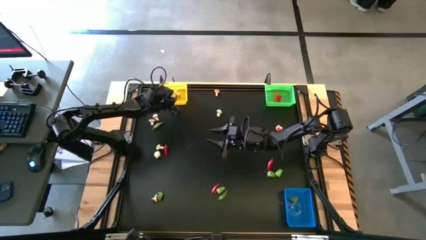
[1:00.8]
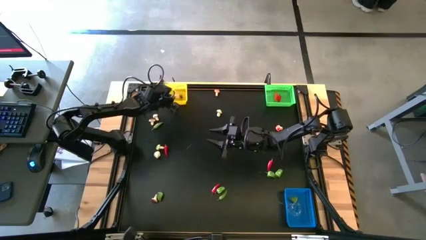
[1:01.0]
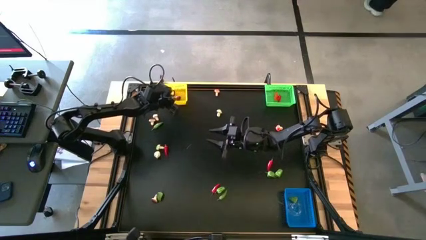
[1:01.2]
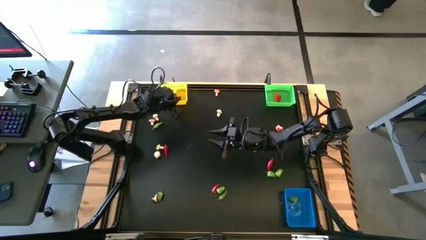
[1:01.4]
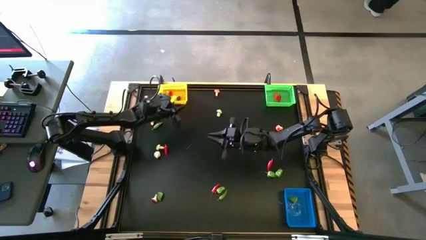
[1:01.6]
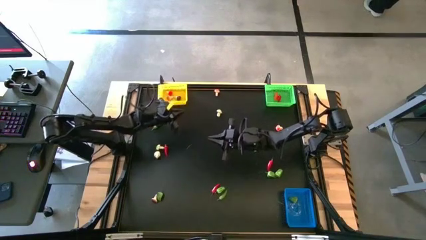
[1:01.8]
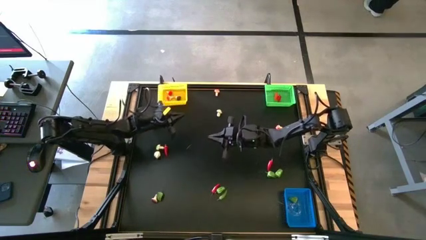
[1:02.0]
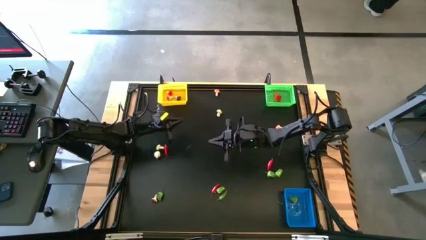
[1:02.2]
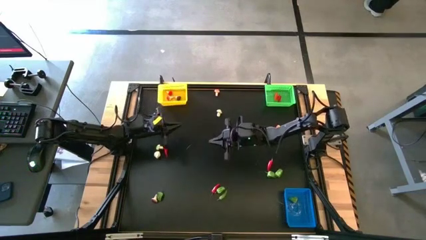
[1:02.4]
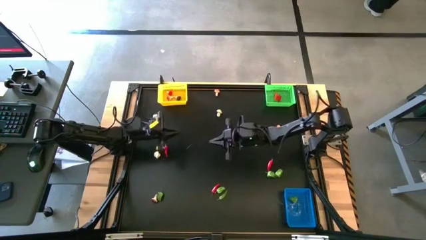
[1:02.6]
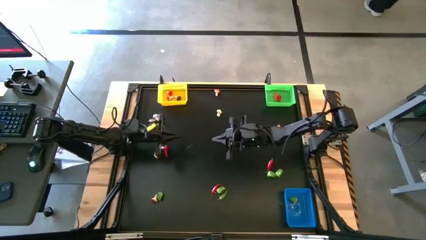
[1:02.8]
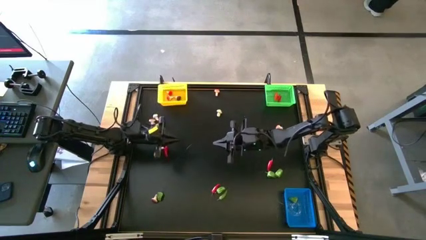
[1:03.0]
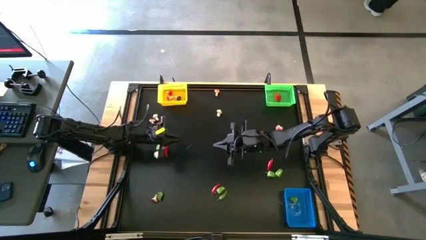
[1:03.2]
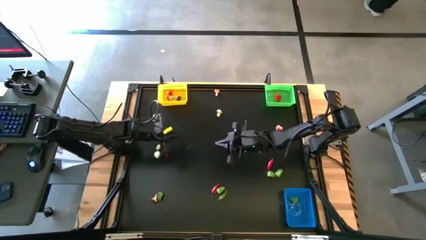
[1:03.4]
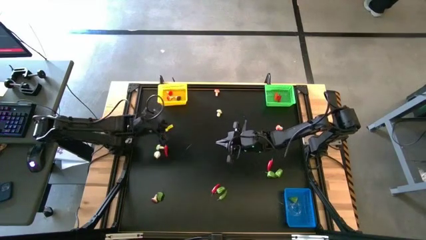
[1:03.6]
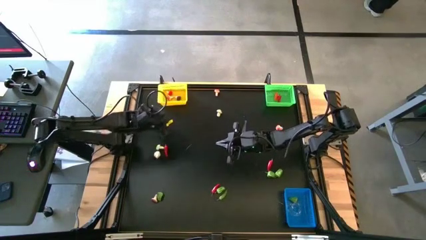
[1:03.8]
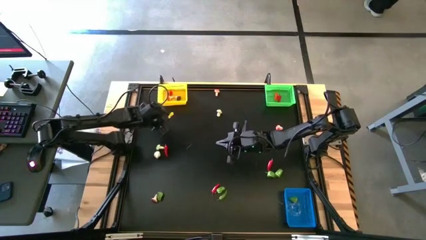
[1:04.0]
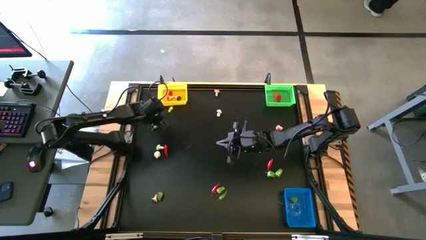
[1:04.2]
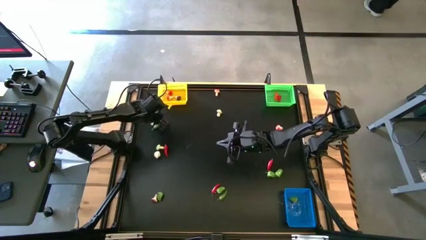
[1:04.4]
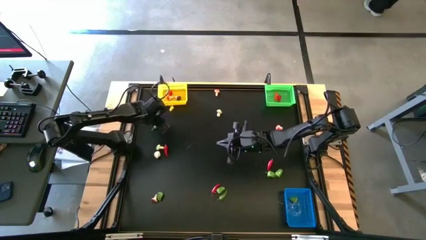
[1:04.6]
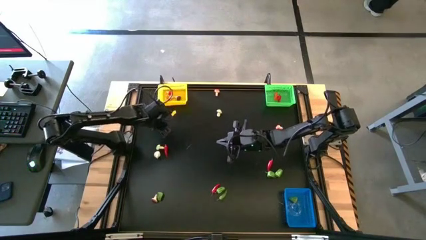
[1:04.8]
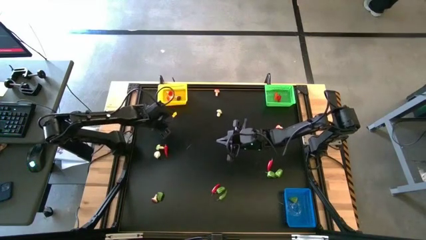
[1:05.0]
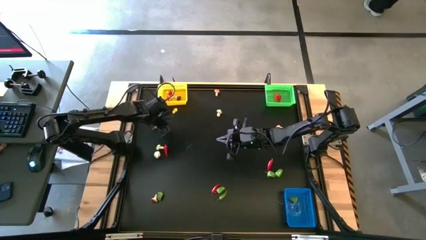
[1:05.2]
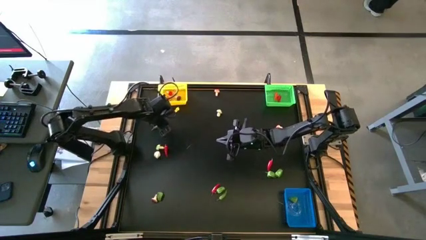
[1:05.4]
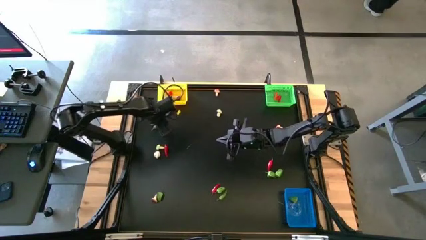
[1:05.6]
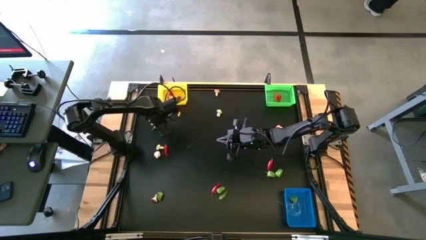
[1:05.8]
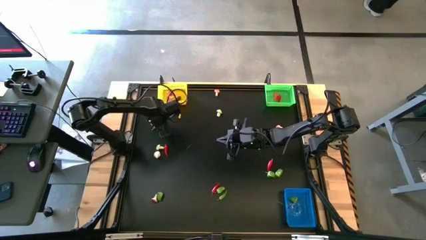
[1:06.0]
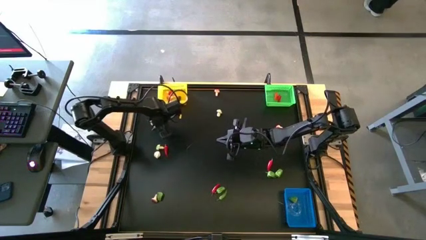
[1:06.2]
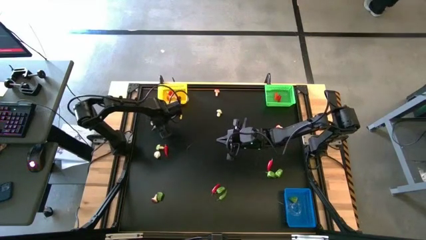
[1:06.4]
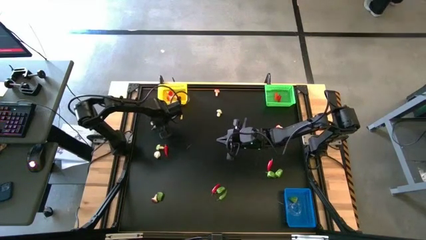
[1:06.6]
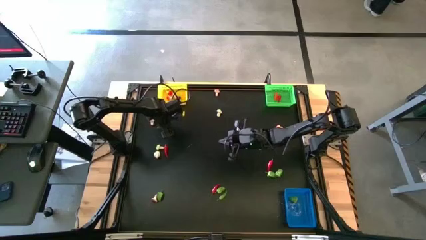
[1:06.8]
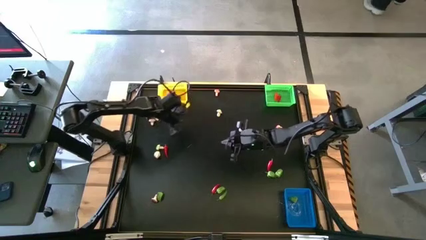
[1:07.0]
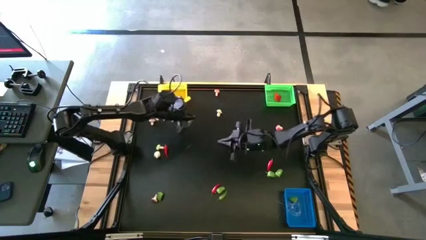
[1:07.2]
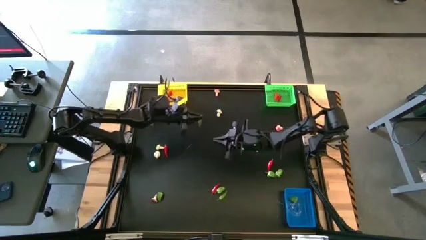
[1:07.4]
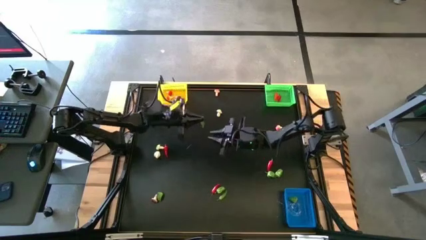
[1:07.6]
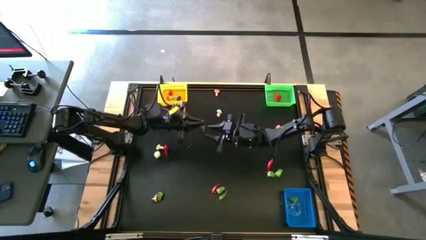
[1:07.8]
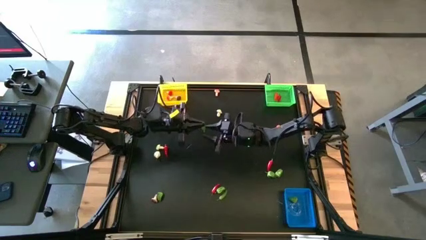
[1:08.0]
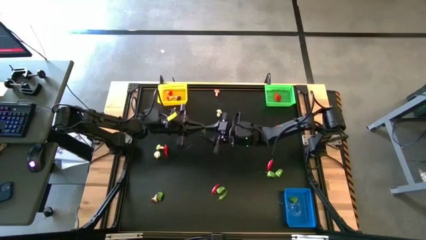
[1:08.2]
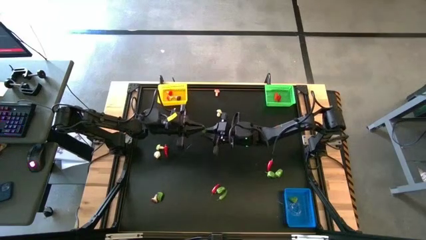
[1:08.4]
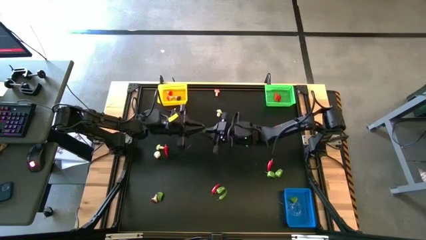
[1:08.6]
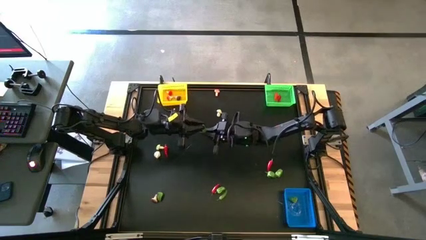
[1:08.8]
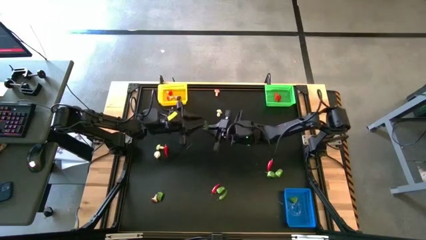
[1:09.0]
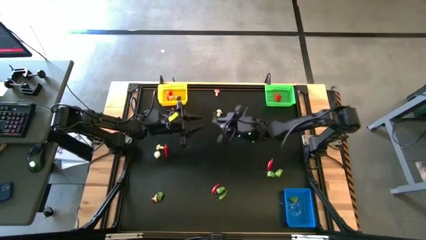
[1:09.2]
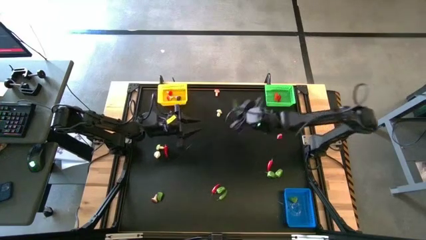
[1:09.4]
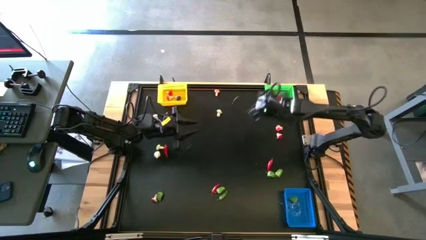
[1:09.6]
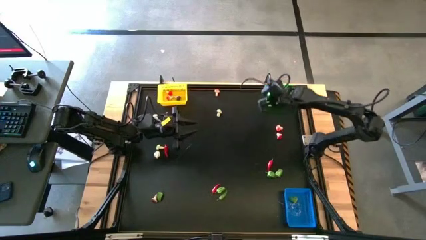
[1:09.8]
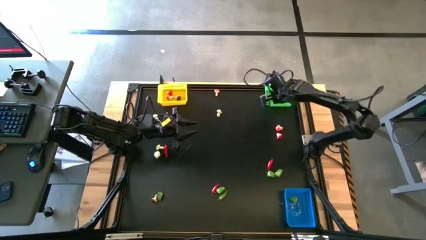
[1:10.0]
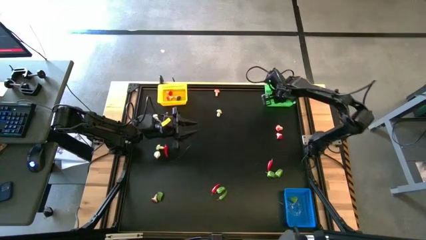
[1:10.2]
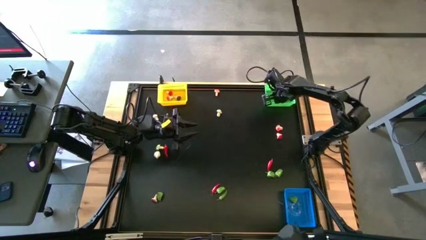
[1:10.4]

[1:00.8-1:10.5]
Task: Sort produce into baskets
Put the green chili pepper into the green bin

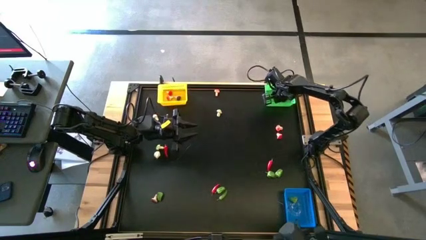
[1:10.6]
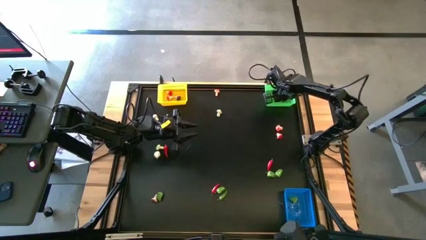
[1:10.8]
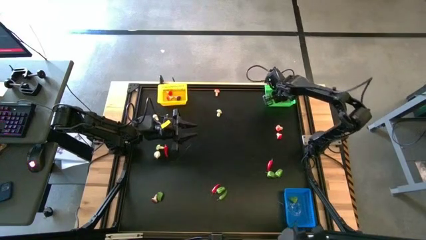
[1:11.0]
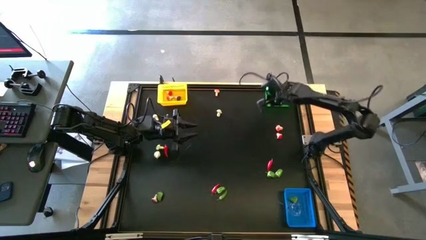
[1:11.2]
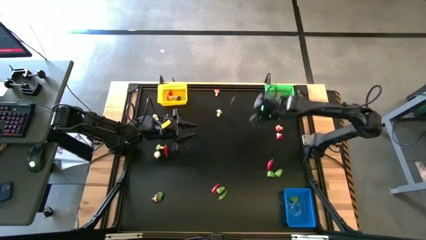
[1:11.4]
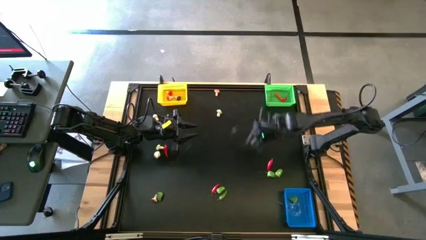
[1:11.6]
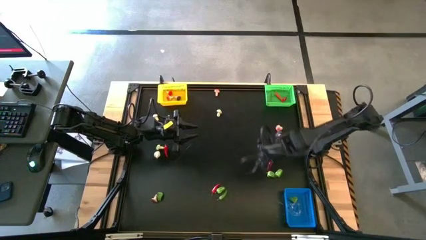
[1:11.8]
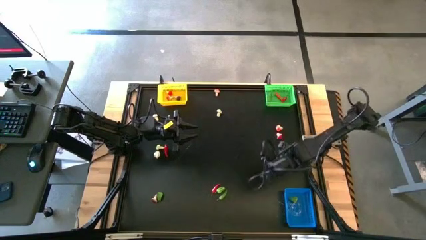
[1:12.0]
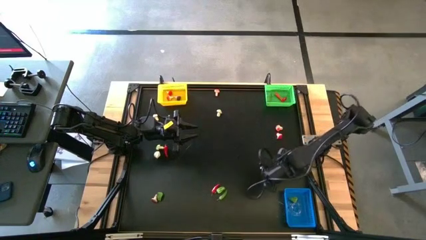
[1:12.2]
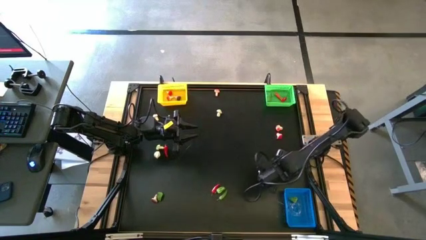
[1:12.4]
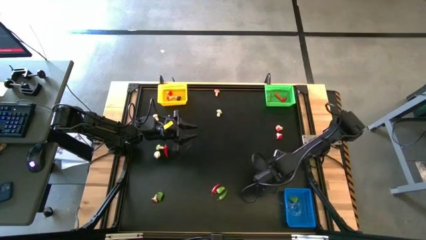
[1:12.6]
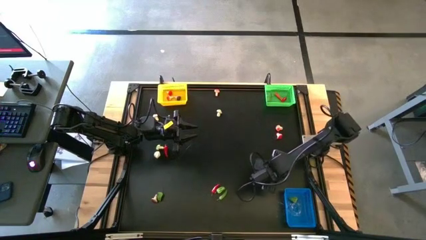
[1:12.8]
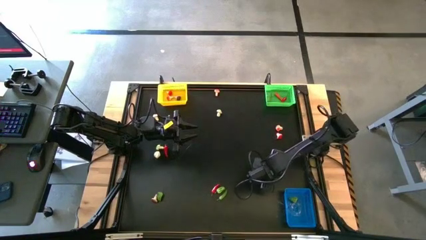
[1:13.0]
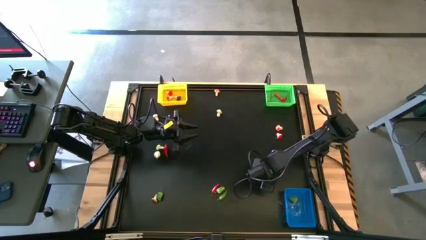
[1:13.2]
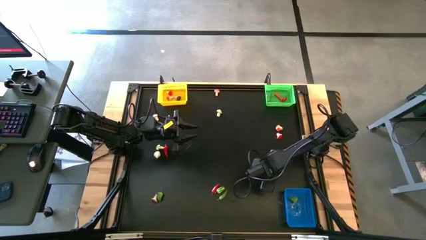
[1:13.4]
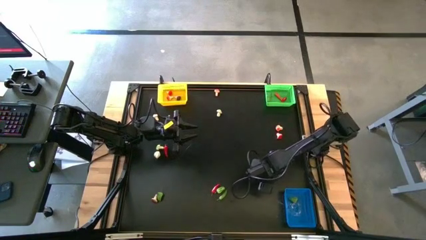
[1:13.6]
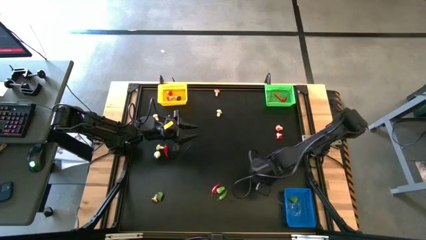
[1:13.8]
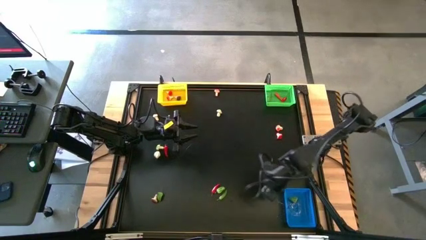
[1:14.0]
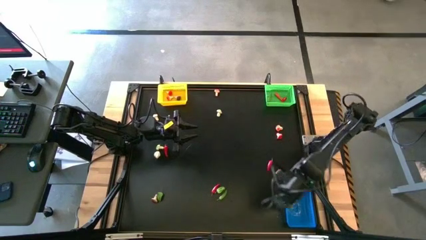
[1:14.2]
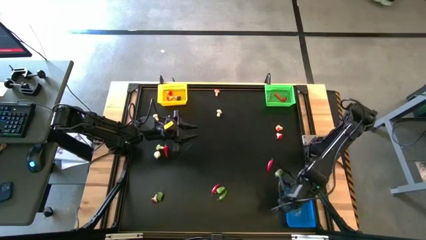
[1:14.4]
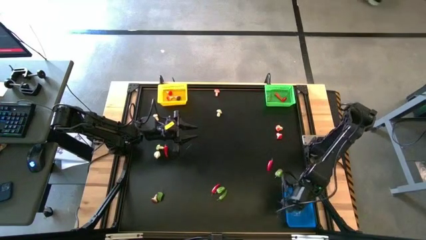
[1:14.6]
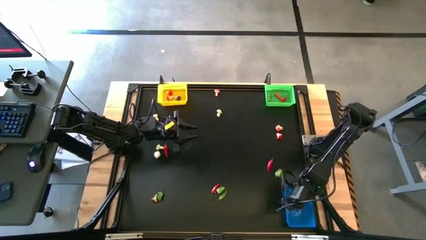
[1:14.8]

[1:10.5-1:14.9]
Put the green bell pepper into the blue bin

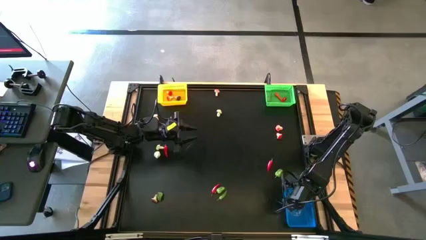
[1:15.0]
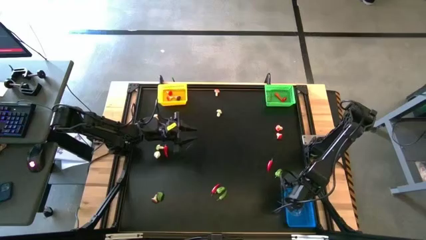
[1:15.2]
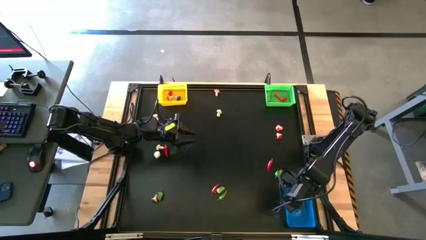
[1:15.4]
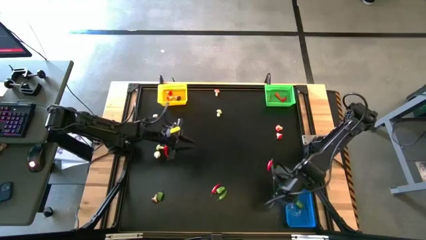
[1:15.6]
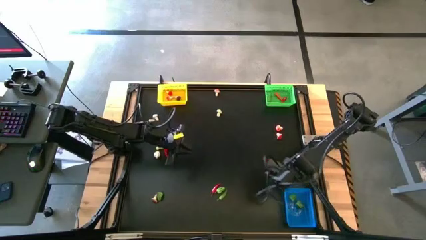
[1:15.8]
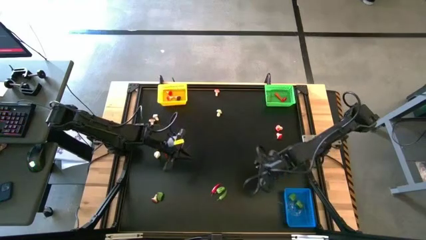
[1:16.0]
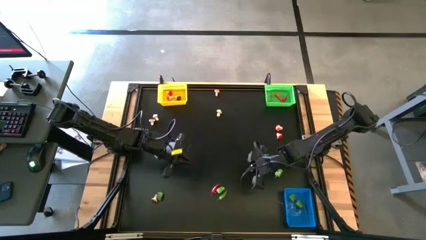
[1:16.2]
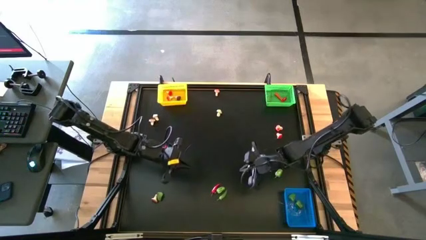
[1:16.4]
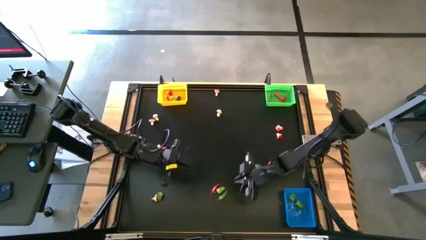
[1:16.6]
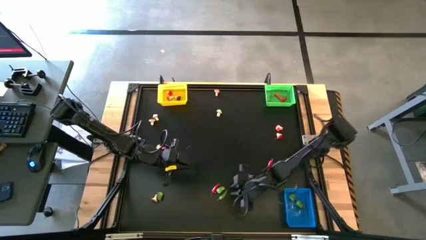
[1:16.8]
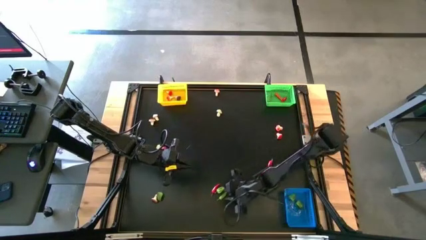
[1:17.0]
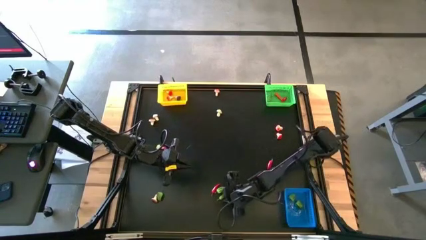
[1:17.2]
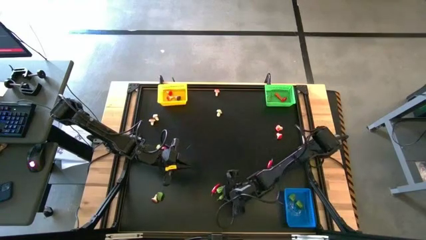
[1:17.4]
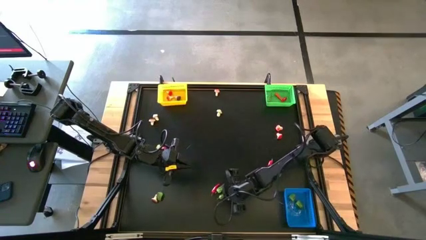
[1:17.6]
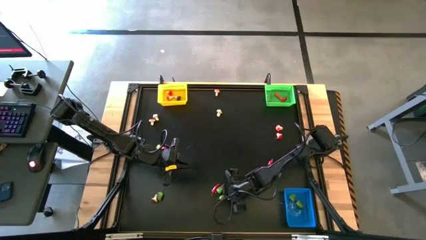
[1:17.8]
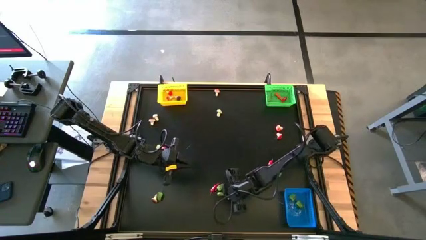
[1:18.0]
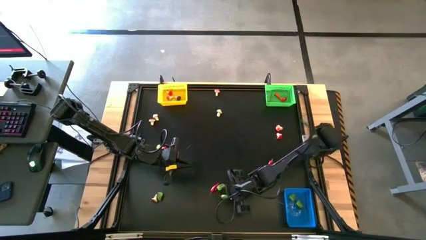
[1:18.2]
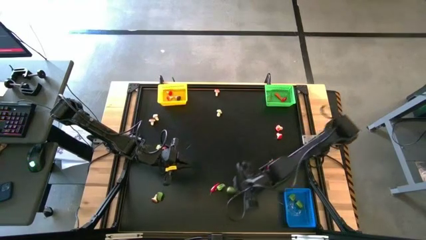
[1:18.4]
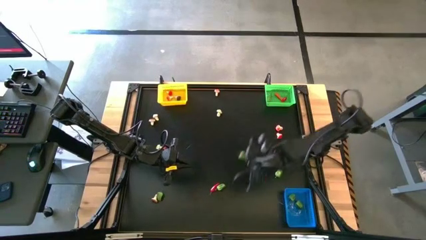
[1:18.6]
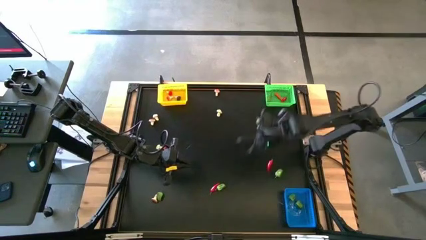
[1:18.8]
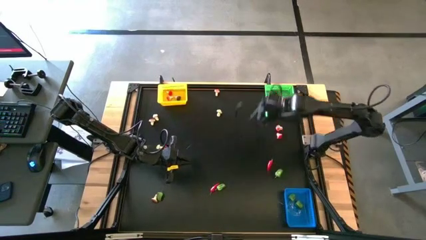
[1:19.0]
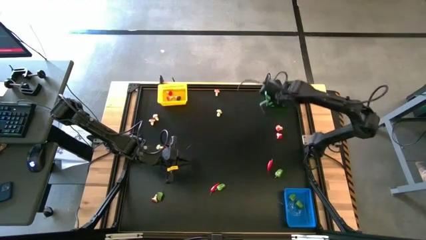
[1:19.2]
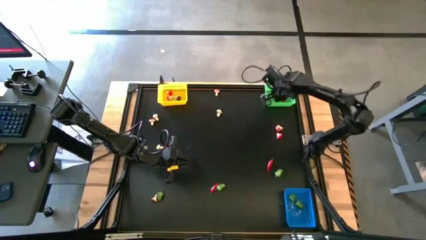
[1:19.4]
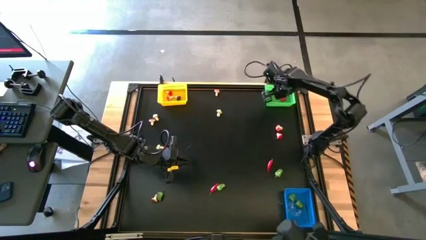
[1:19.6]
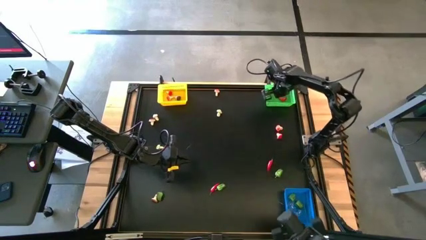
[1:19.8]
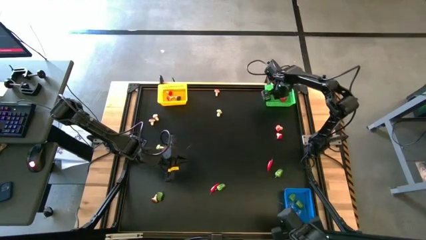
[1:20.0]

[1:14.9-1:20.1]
Put the green chili pepper into the green bin
